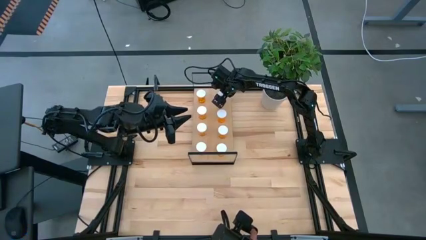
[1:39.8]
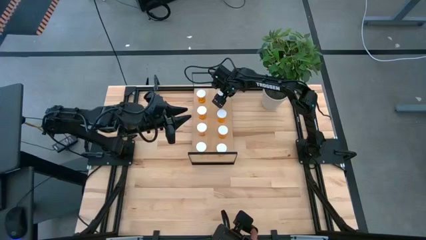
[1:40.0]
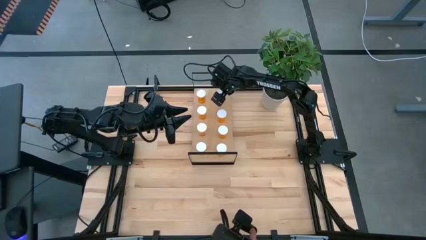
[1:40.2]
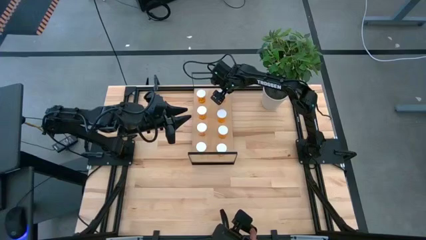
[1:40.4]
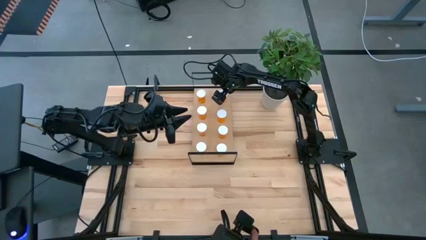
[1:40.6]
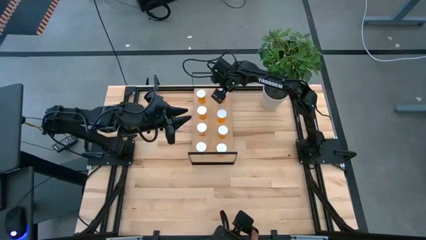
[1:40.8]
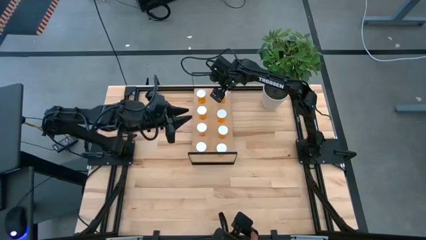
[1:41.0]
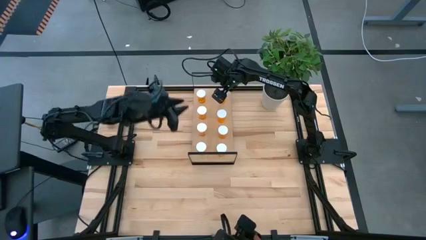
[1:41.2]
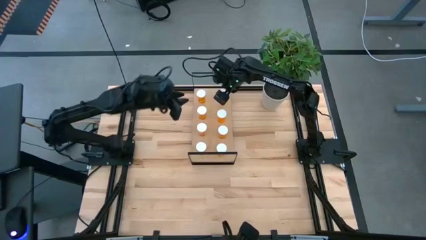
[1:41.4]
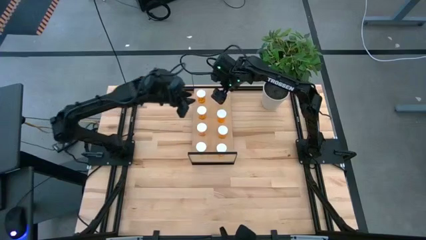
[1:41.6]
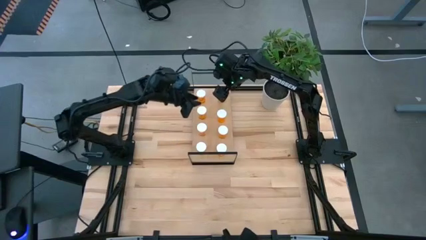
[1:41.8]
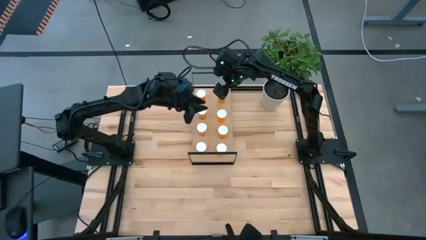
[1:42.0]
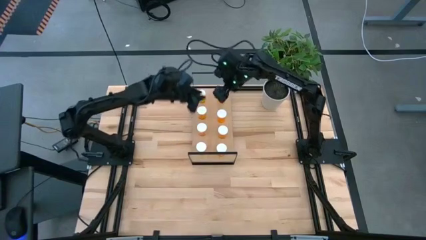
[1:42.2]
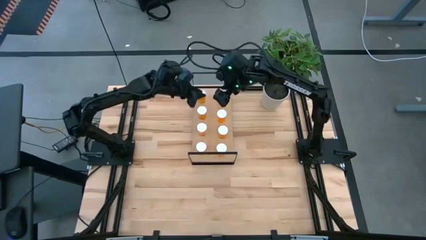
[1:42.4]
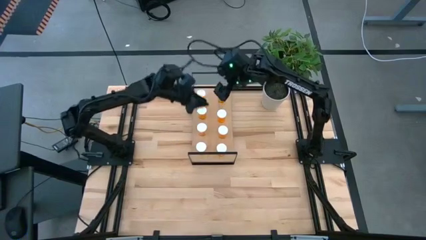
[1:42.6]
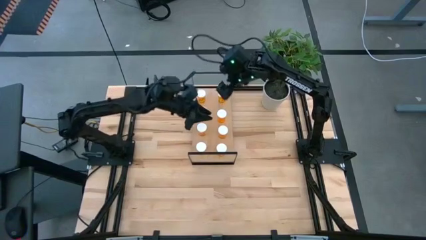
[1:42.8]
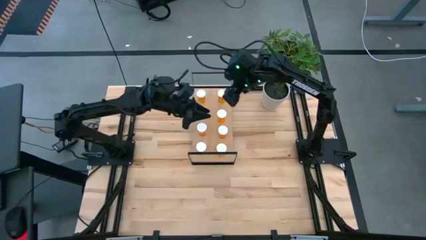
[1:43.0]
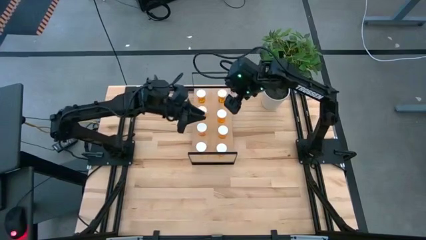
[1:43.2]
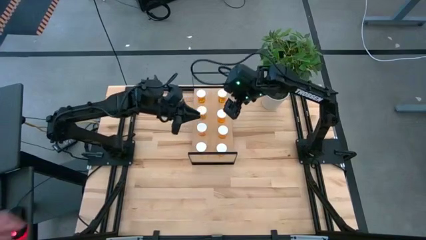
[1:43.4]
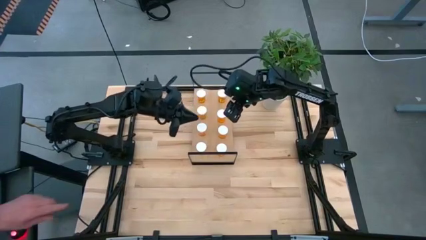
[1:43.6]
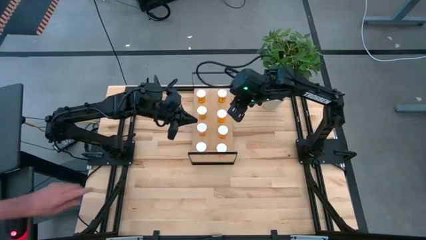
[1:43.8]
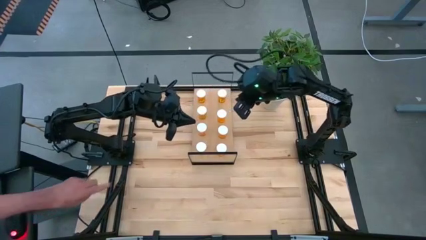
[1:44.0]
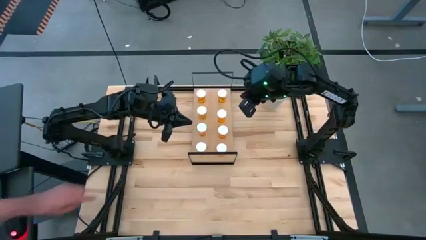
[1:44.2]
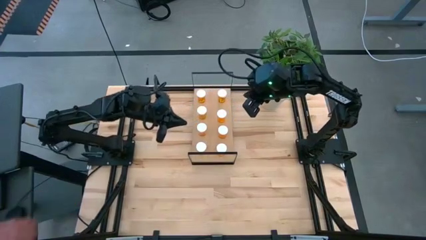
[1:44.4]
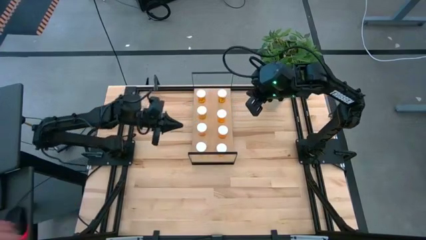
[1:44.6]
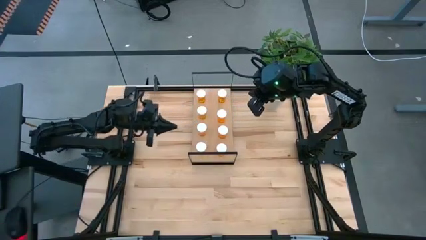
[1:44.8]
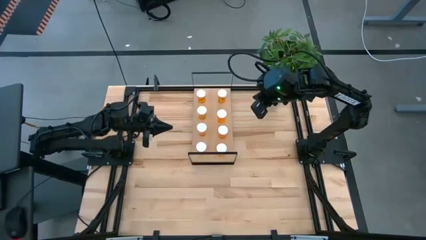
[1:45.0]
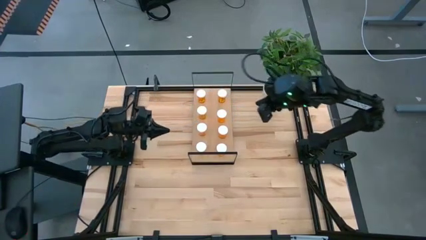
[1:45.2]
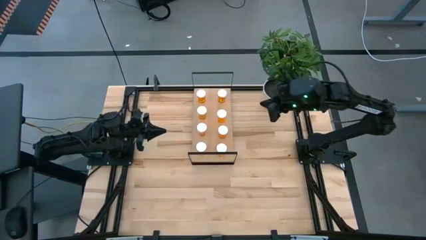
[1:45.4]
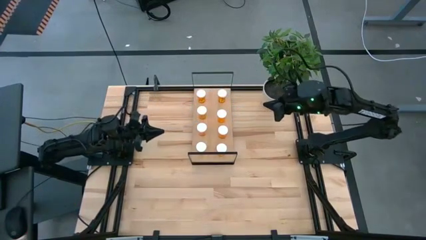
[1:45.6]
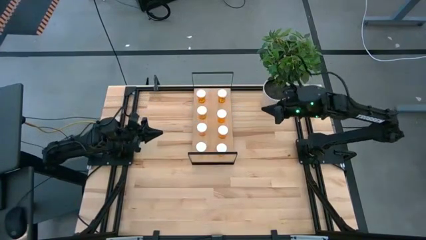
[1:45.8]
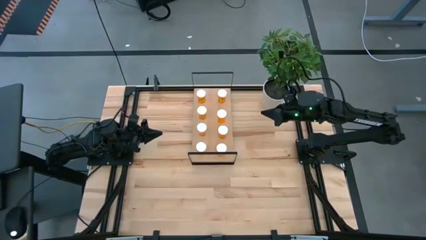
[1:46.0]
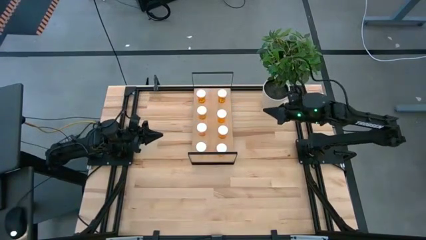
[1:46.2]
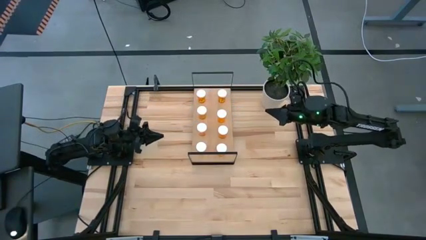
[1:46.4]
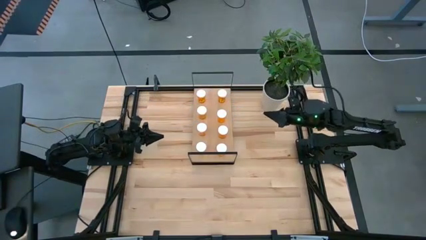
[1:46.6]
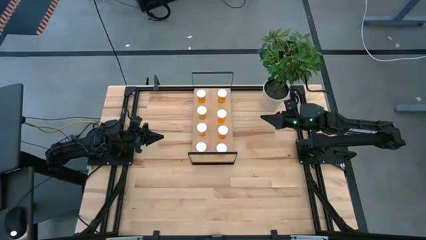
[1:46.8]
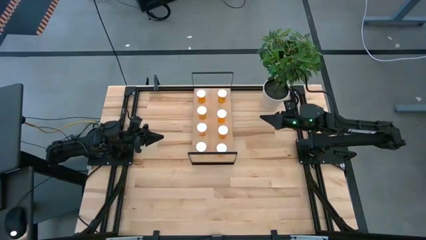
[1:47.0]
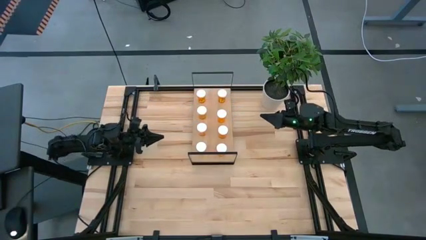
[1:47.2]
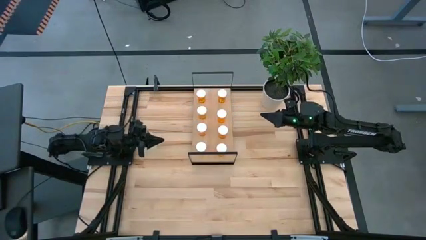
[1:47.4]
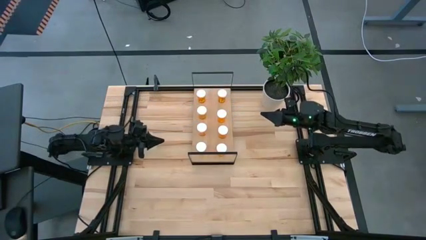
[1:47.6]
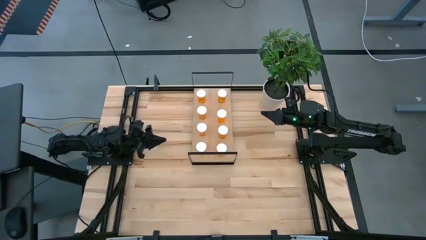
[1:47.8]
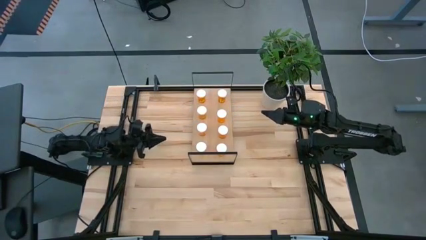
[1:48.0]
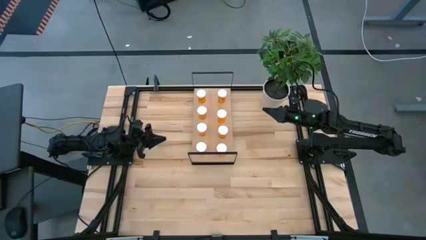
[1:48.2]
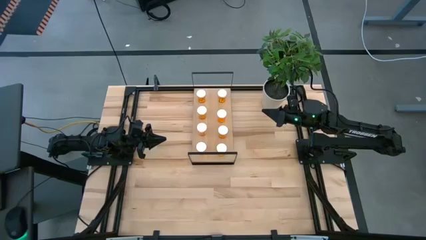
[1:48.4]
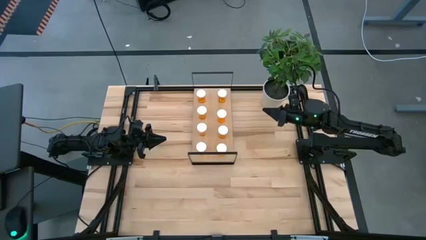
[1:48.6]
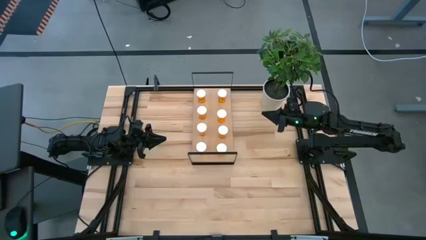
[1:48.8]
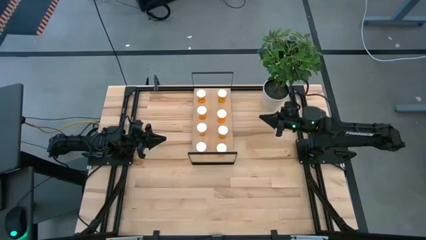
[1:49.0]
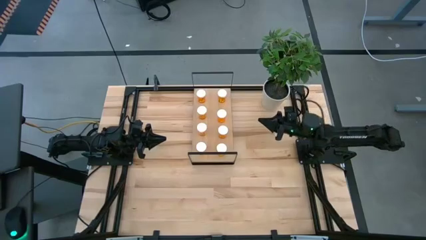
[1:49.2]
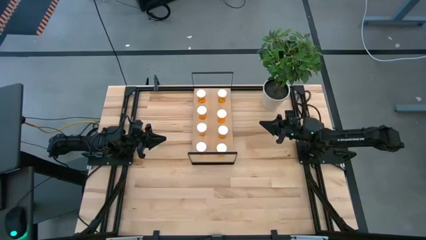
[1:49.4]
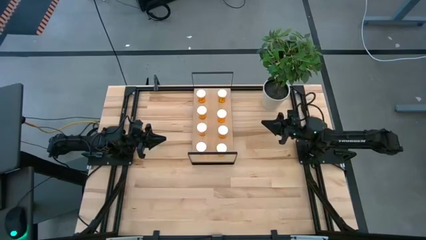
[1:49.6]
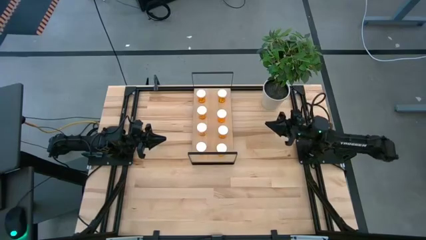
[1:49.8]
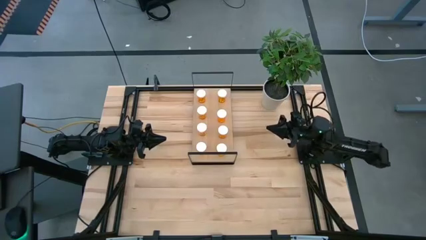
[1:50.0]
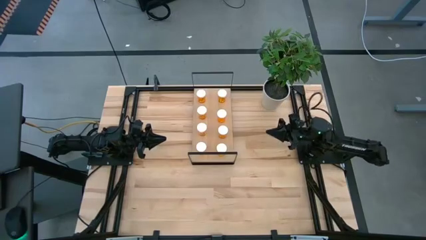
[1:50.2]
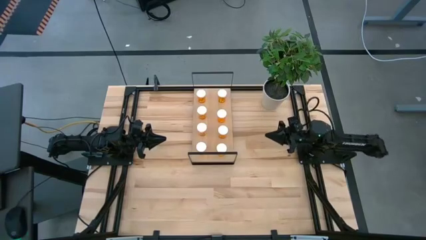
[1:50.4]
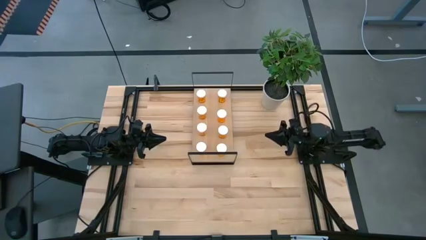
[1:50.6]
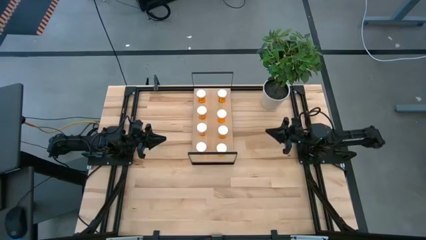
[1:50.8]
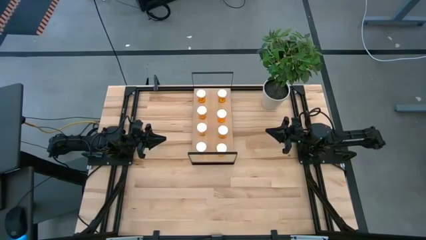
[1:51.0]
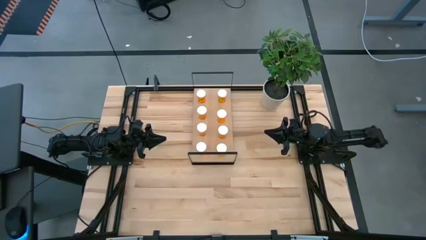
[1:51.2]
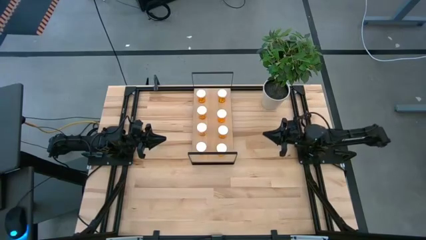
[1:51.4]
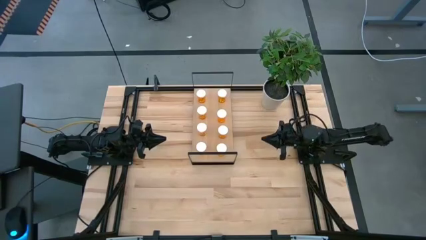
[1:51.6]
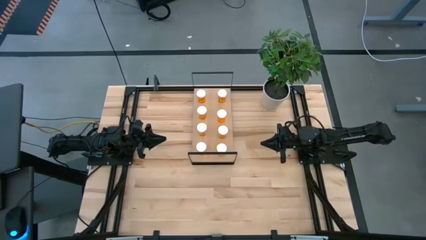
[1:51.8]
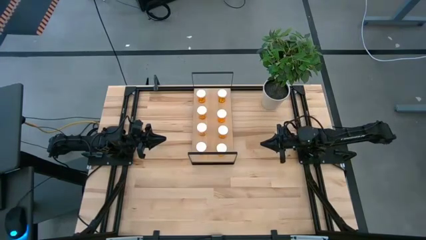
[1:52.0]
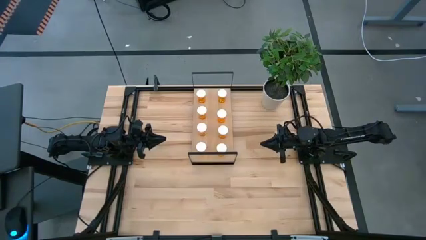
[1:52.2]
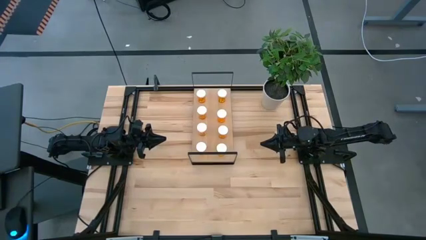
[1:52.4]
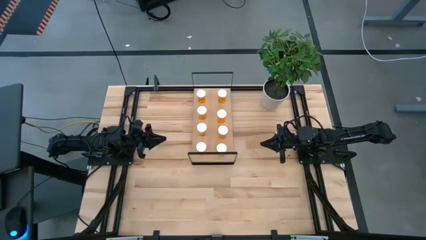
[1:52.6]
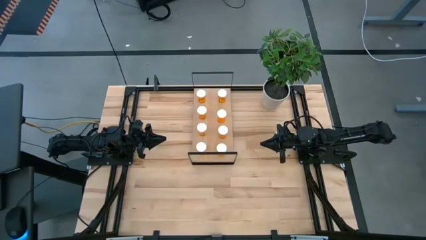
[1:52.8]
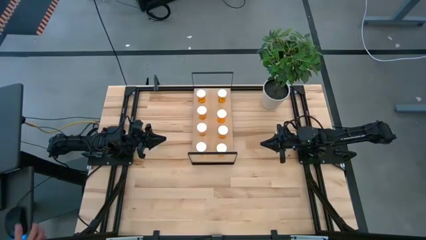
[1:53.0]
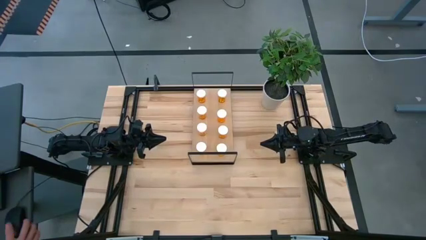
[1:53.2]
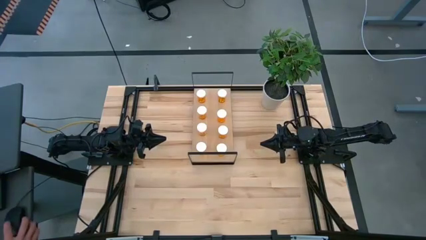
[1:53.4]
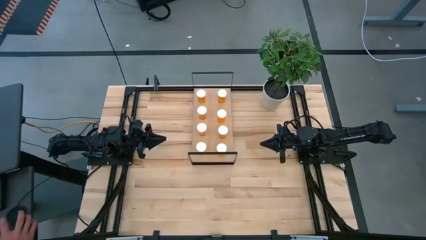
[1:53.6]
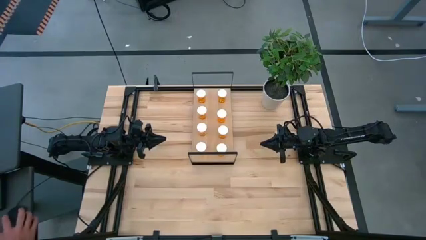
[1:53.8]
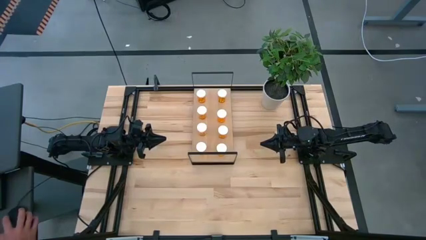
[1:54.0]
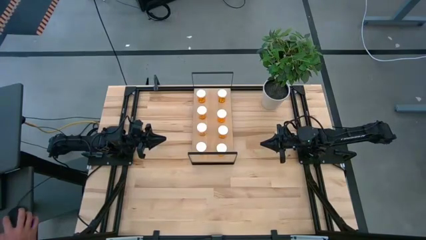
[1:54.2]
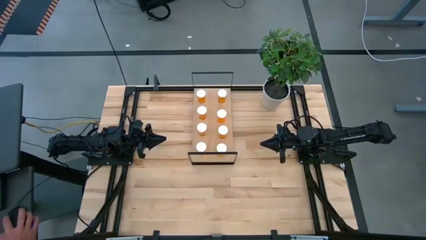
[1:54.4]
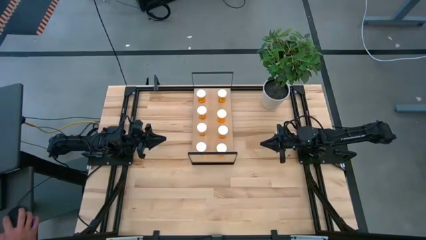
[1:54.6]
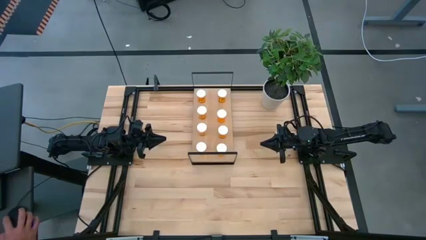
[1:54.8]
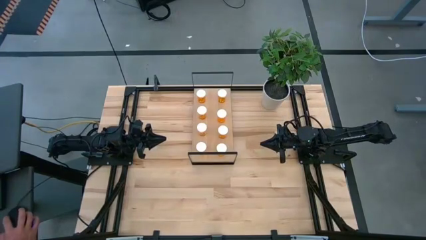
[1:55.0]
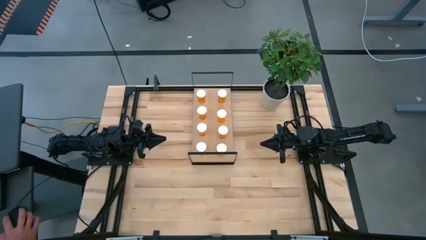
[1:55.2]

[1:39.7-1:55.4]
Task: Pick and place medicine bottles onto shelf by color
Return to Home Position

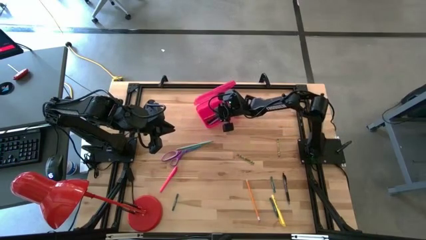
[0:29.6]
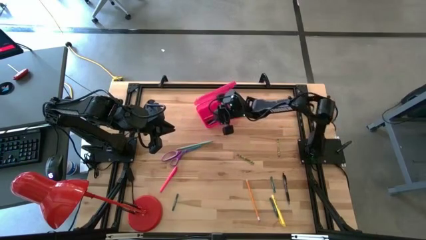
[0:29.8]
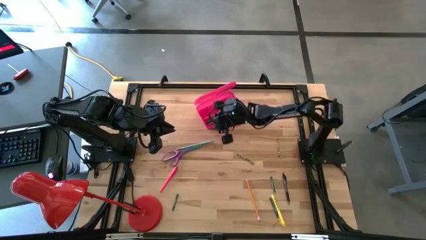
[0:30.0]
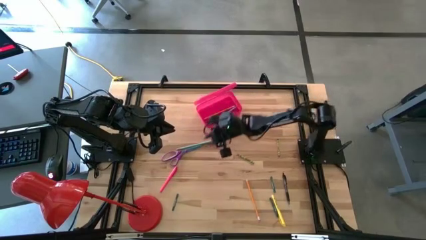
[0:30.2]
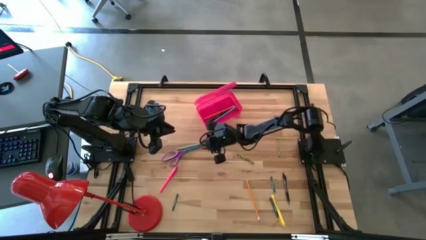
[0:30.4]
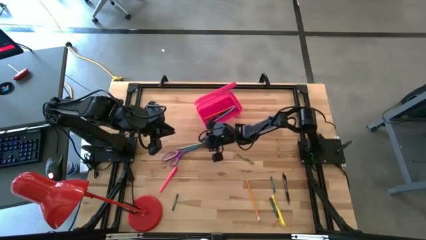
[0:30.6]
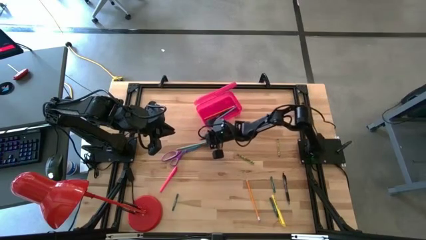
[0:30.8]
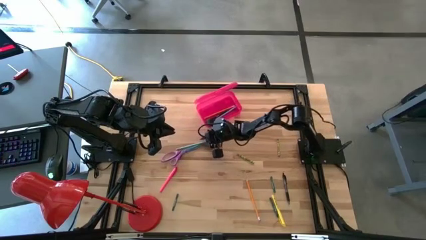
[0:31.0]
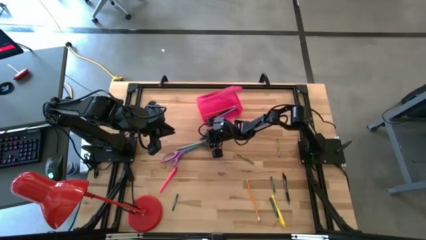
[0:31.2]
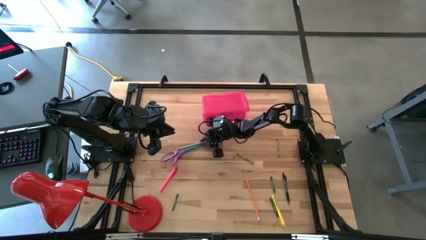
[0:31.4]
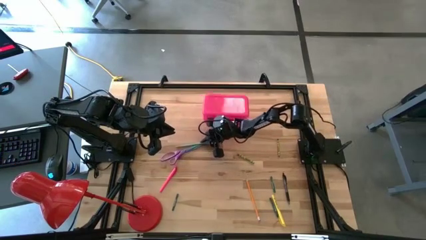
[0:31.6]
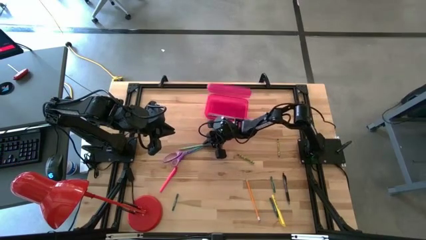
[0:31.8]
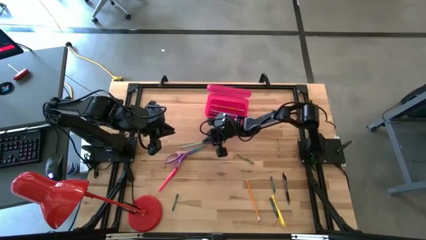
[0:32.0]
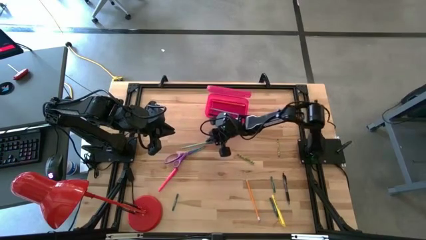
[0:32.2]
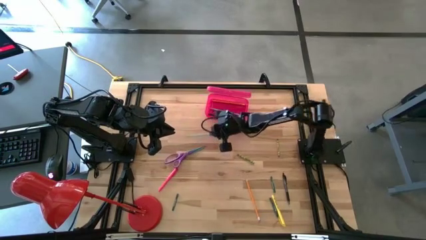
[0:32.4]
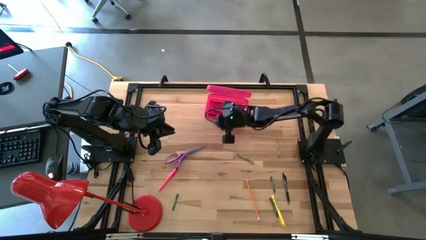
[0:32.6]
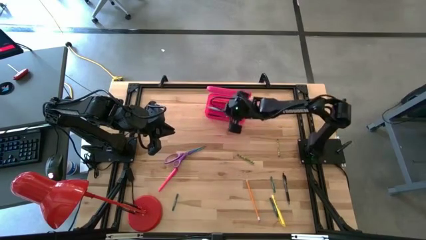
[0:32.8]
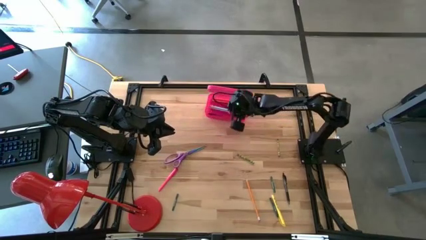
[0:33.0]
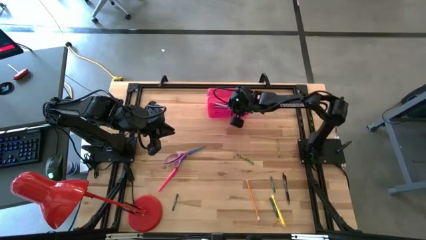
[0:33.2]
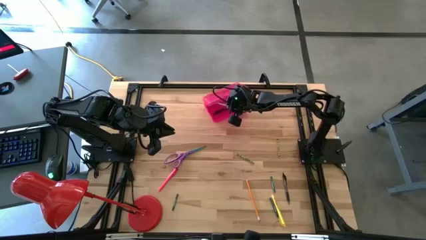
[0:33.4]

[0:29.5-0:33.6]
Task: Pick & place school supplies into a supply box
Put the green pencil into the pink supply box
